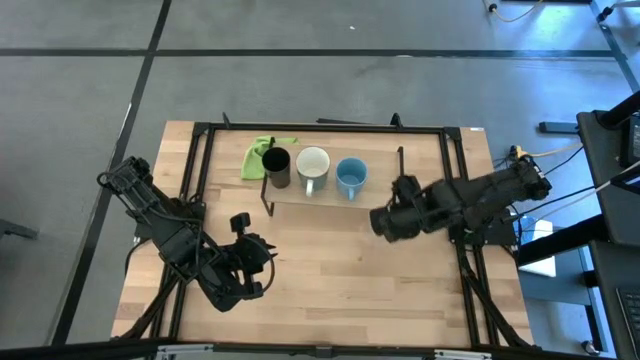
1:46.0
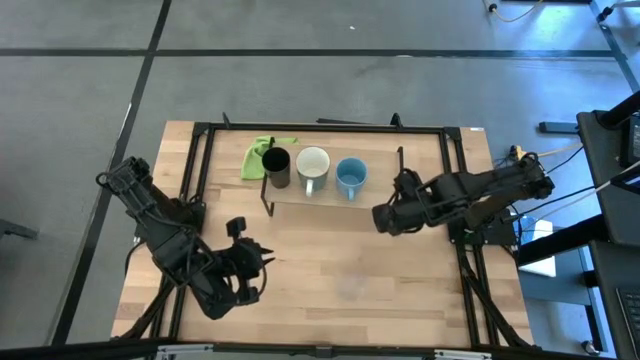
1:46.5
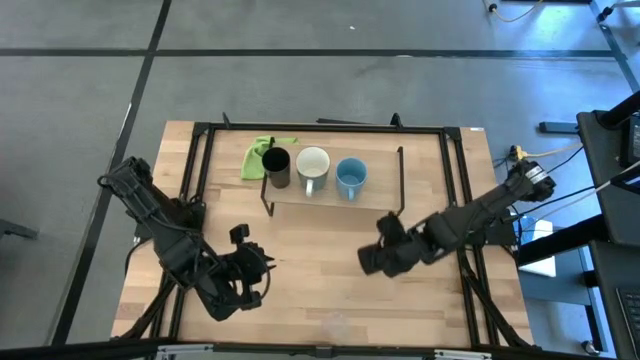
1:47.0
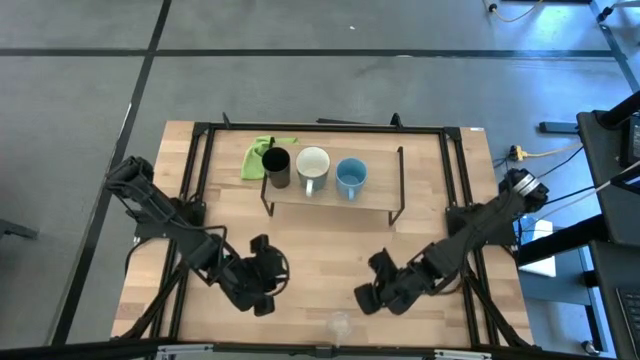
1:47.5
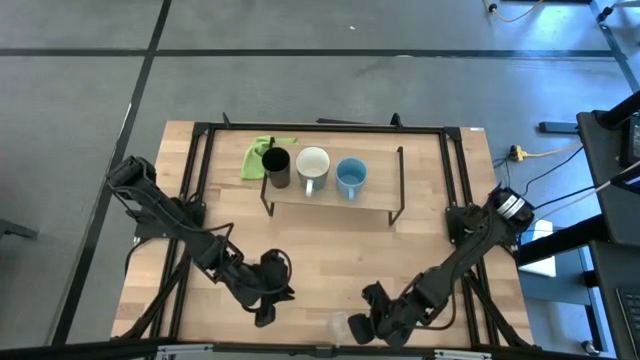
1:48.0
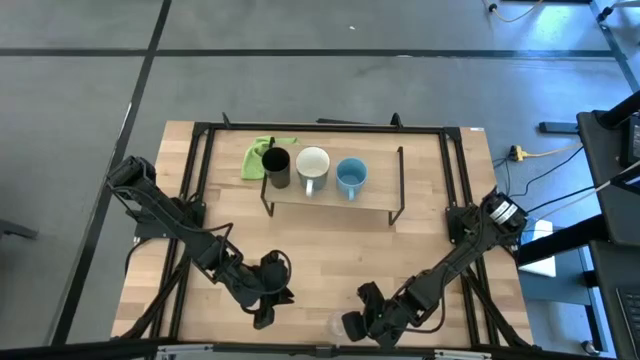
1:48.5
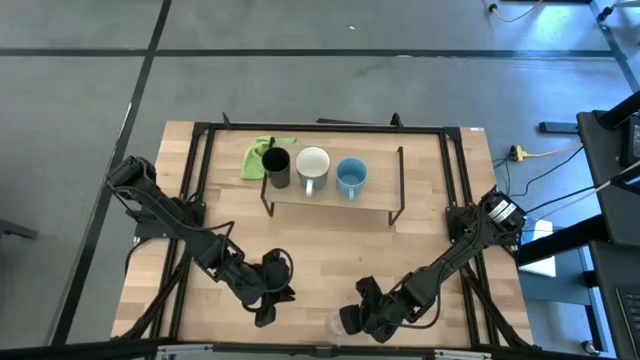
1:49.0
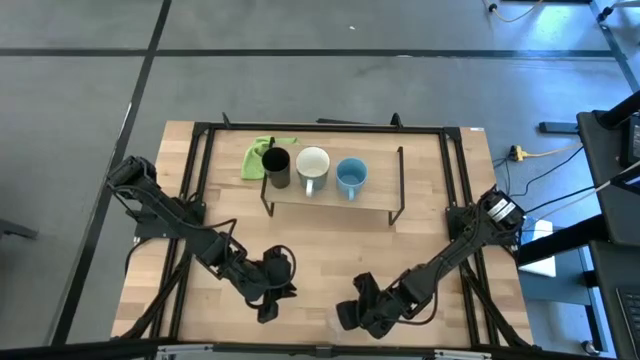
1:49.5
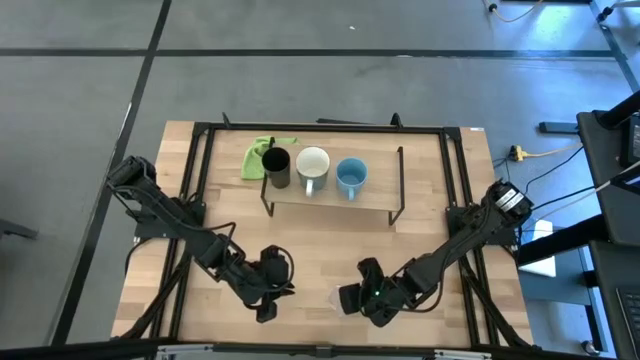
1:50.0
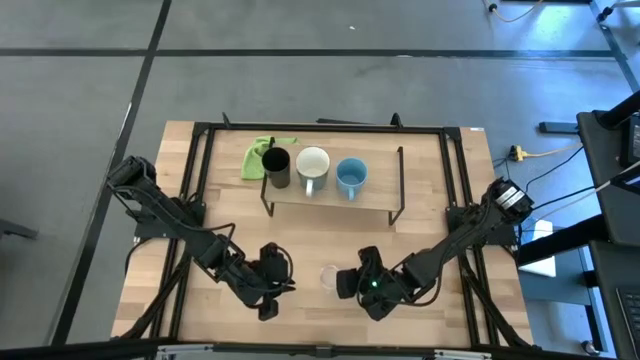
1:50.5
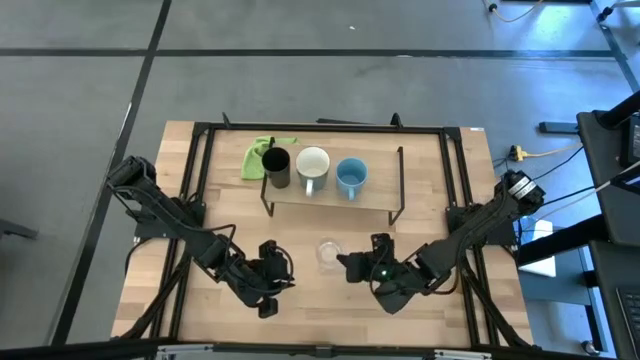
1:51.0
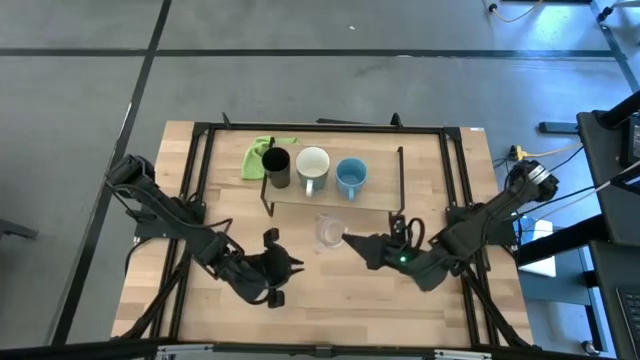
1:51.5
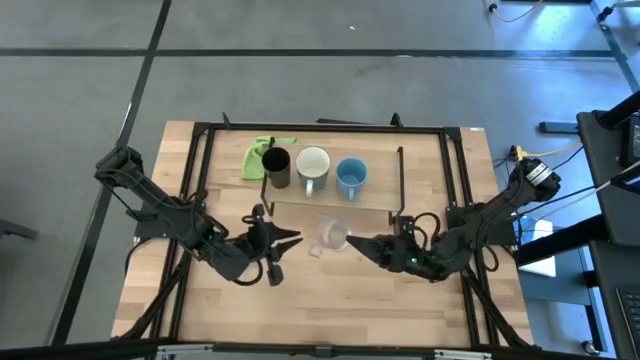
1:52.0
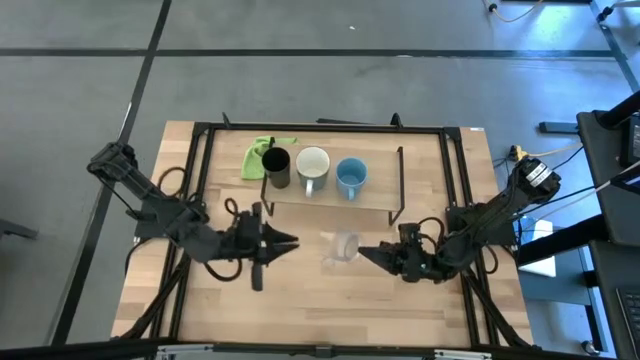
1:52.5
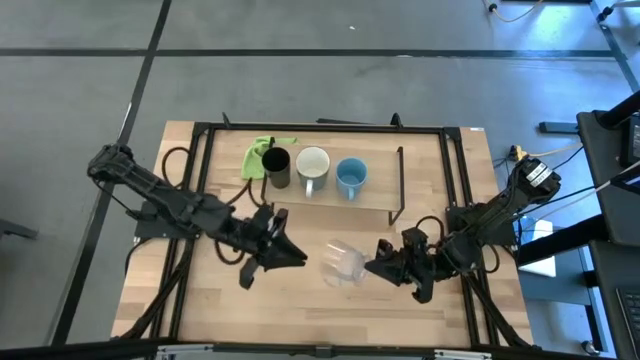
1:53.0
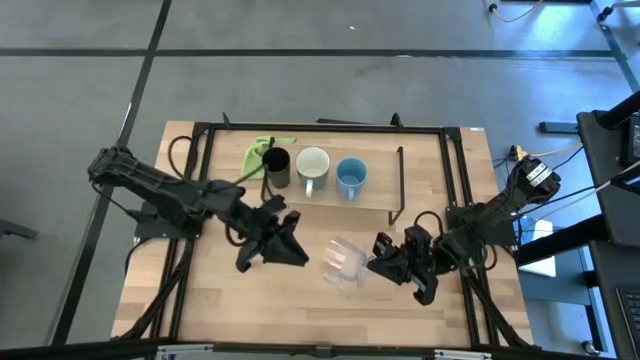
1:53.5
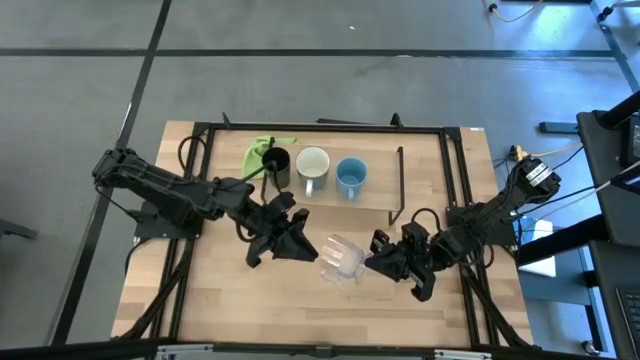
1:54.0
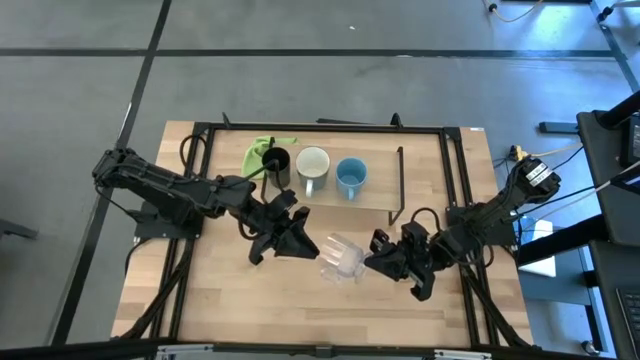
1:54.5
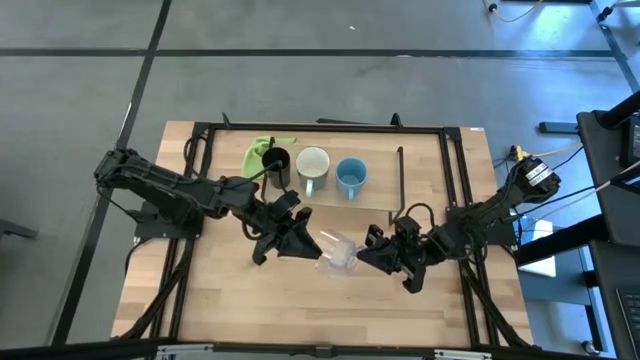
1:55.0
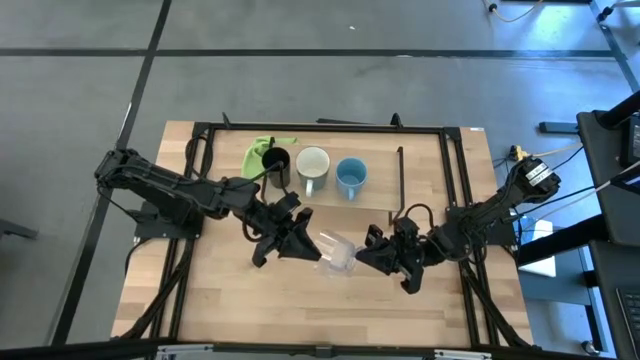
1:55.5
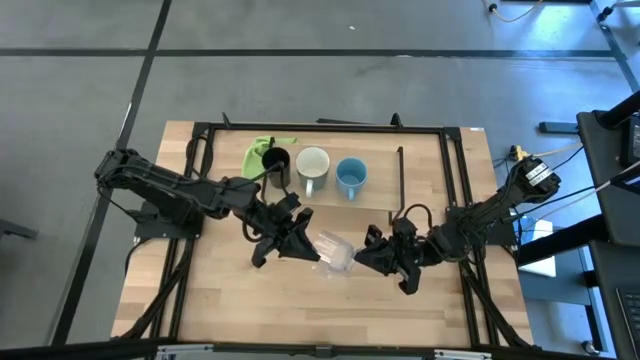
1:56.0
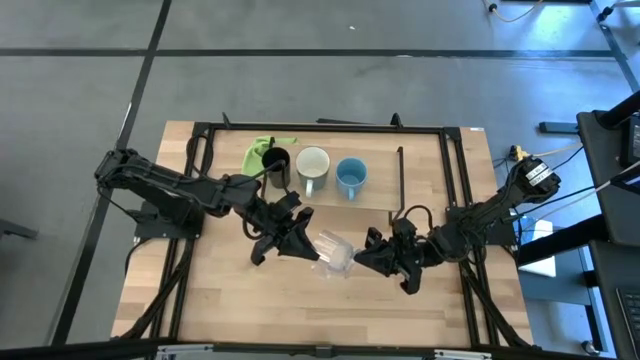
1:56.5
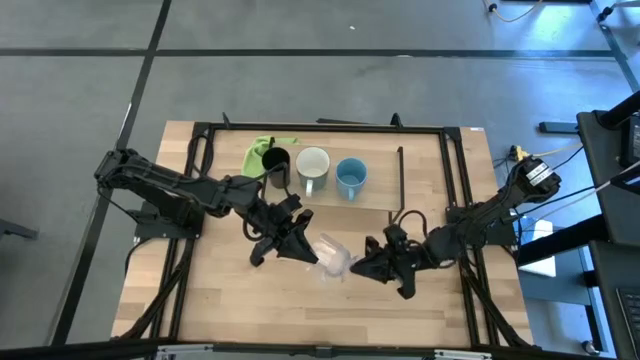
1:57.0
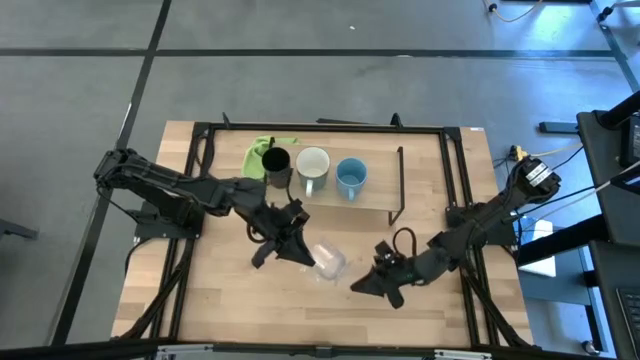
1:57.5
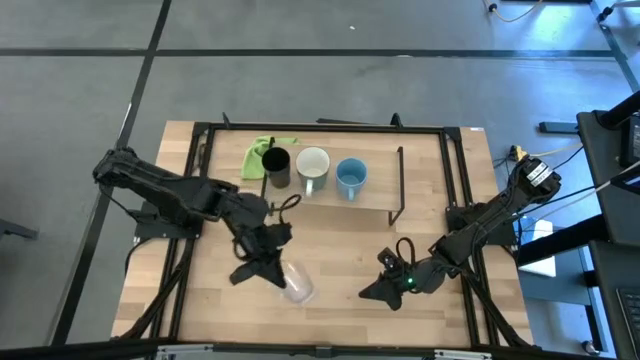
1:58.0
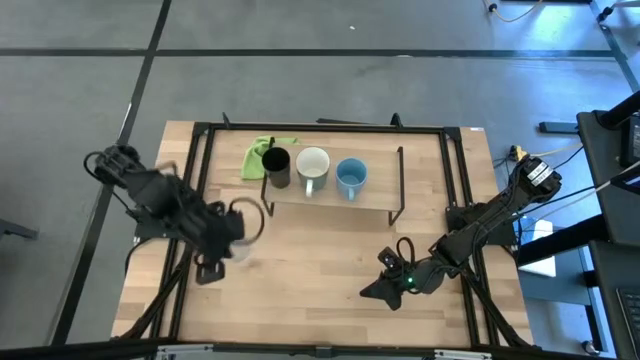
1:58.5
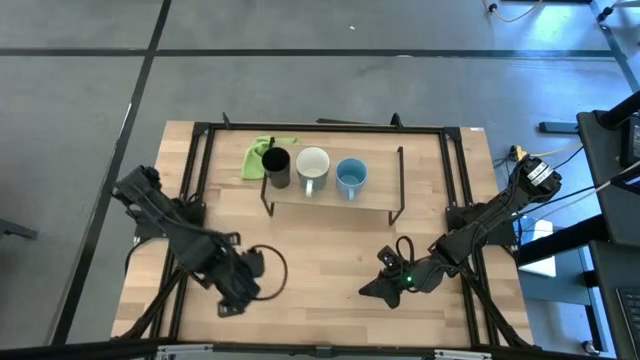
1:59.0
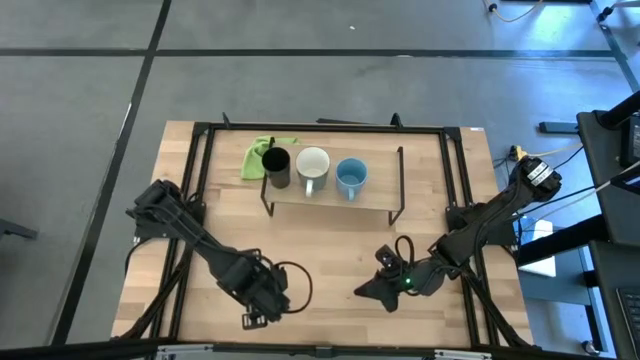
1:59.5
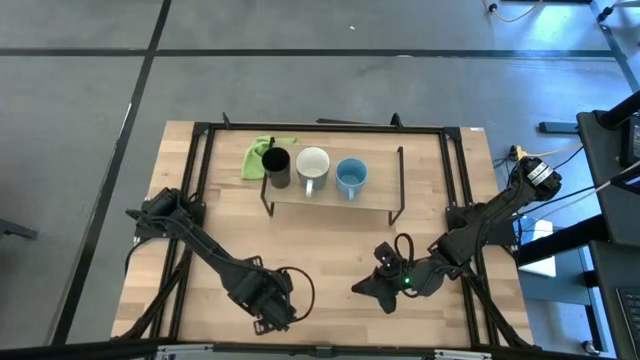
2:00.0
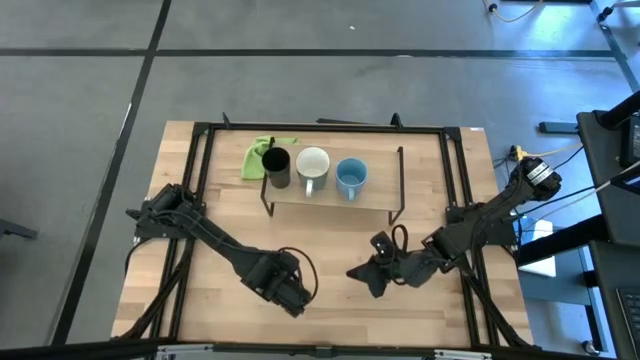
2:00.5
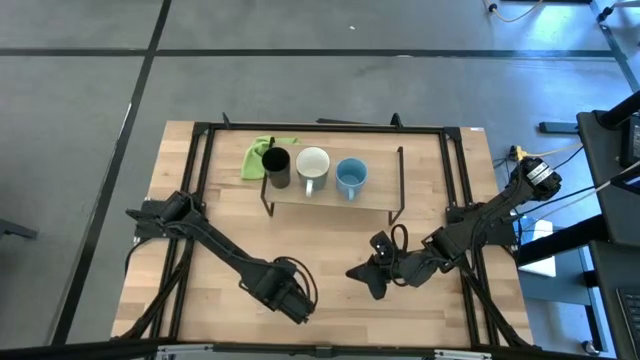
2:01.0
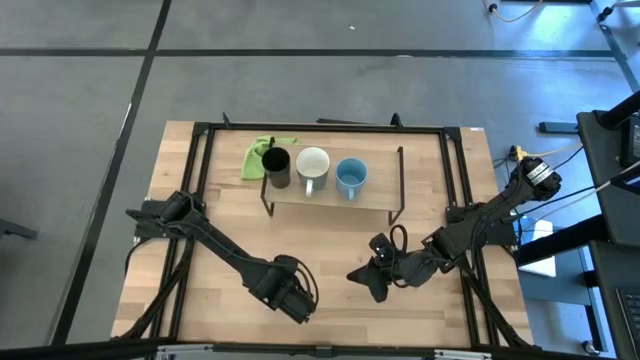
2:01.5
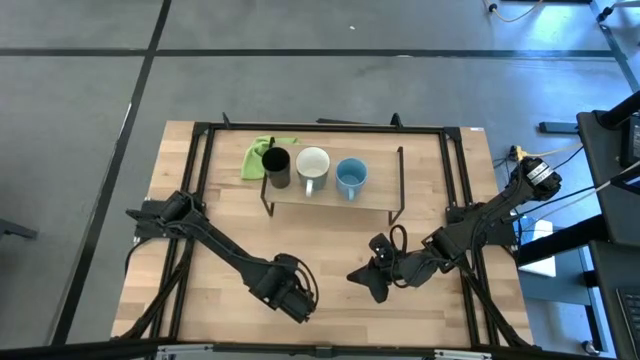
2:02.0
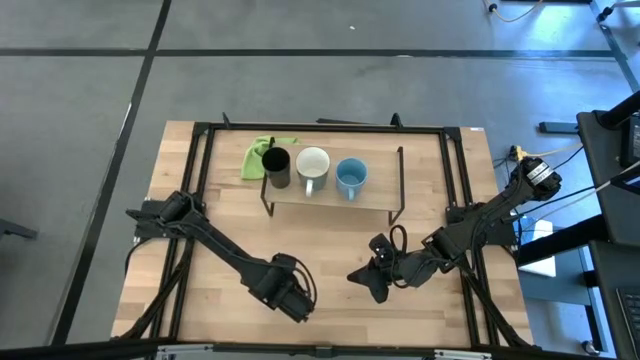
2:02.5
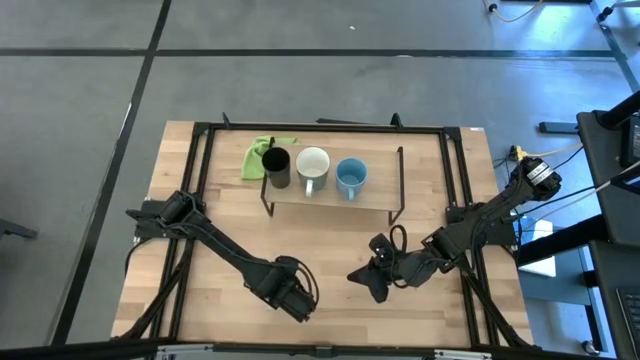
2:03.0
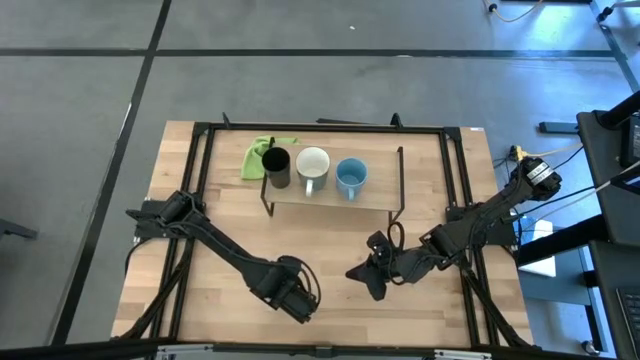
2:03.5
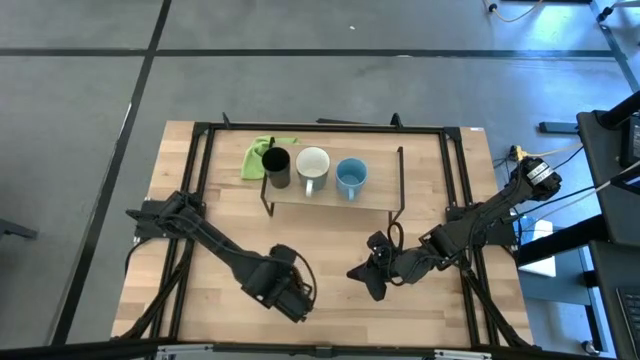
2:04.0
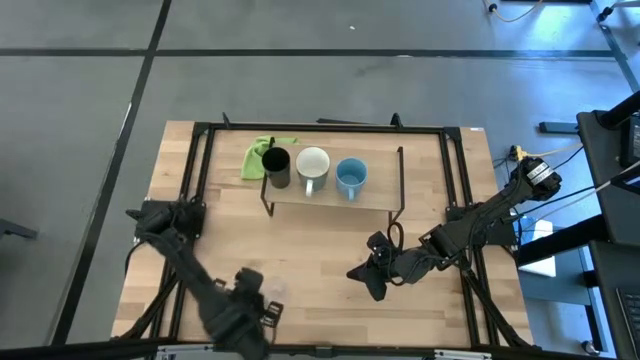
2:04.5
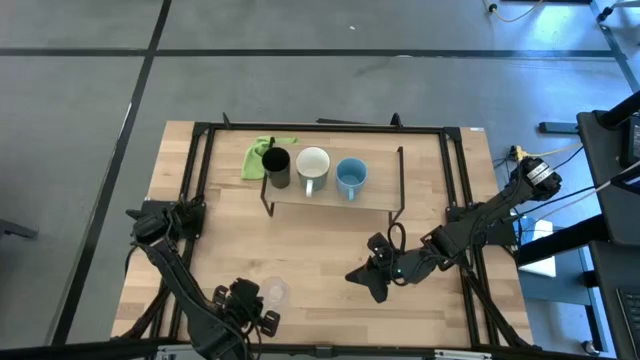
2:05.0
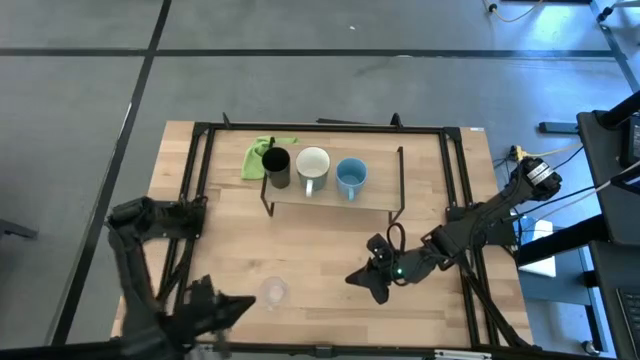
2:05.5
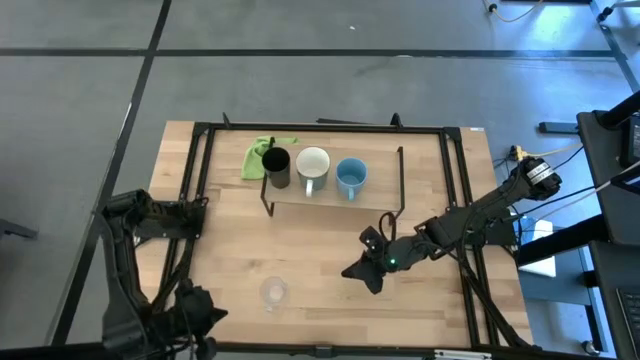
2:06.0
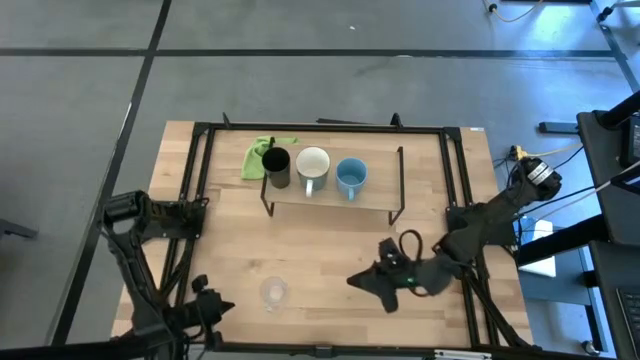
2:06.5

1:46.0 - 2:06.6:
Task: Stack small to large cups/mugs on shelf
Put the transparent mug on the shelf
